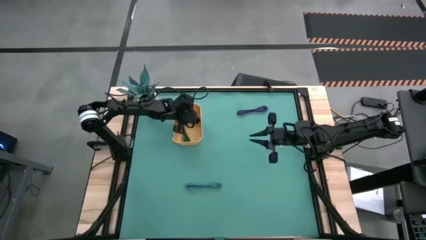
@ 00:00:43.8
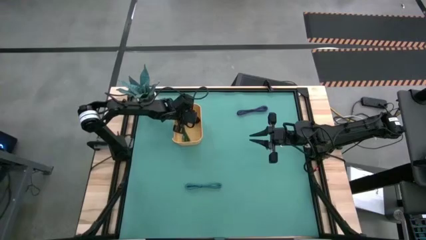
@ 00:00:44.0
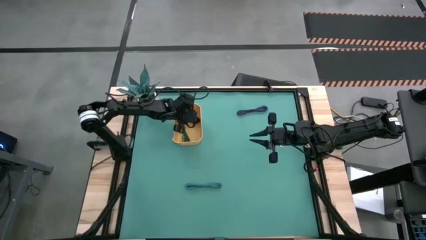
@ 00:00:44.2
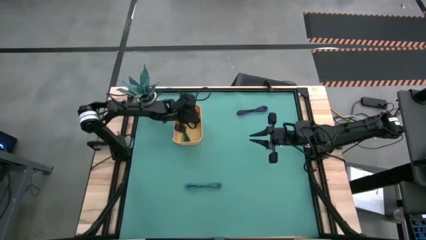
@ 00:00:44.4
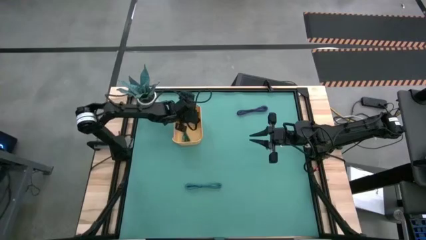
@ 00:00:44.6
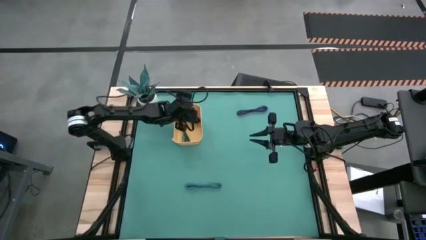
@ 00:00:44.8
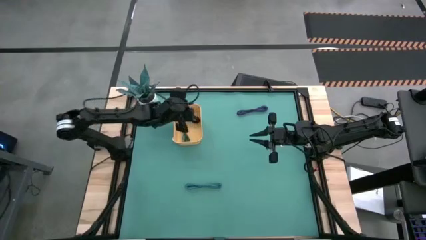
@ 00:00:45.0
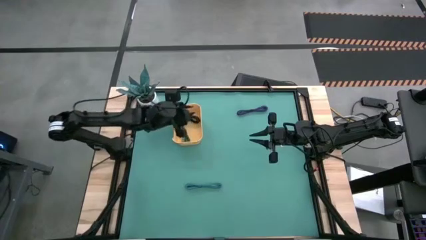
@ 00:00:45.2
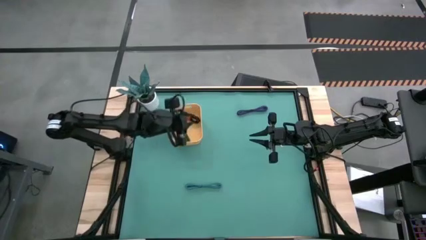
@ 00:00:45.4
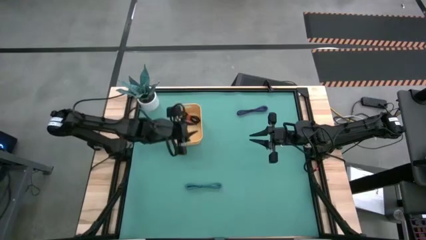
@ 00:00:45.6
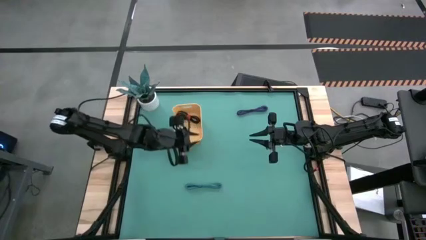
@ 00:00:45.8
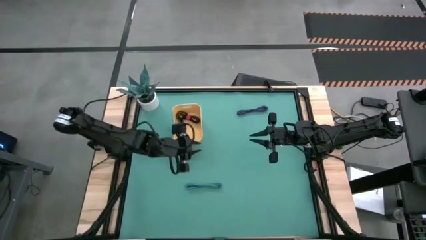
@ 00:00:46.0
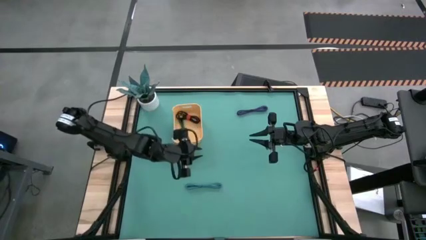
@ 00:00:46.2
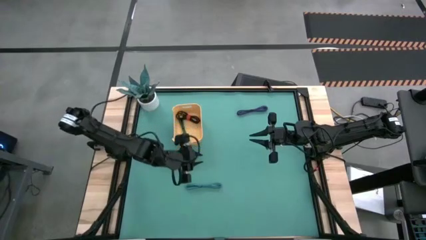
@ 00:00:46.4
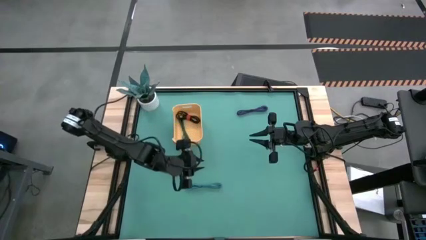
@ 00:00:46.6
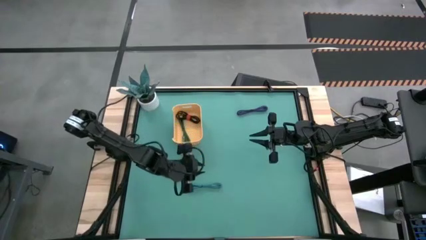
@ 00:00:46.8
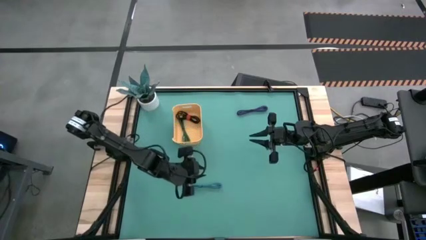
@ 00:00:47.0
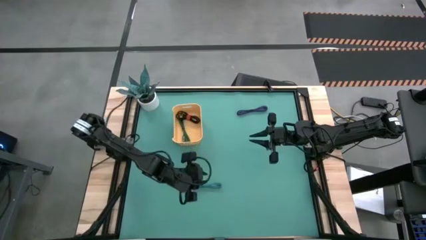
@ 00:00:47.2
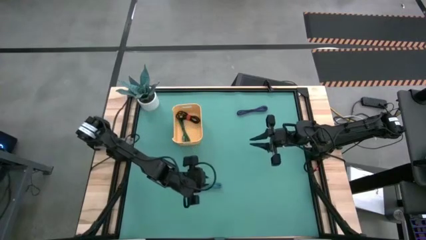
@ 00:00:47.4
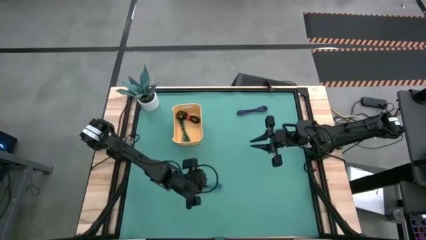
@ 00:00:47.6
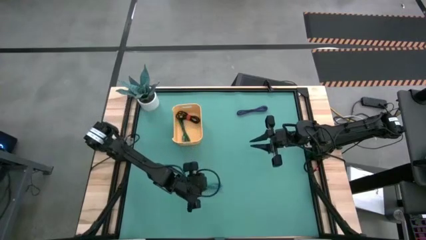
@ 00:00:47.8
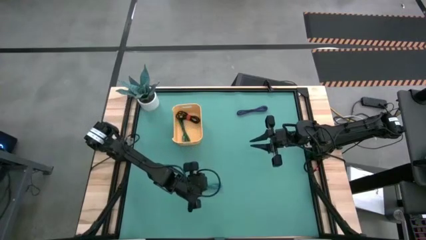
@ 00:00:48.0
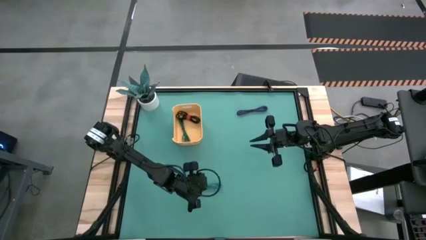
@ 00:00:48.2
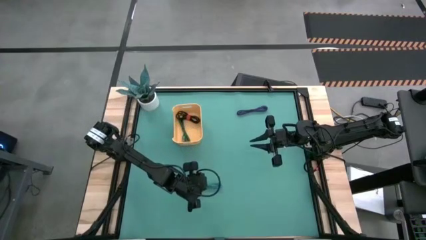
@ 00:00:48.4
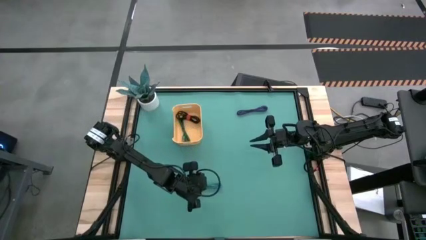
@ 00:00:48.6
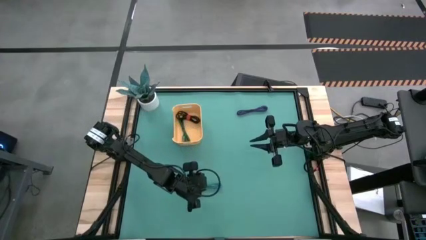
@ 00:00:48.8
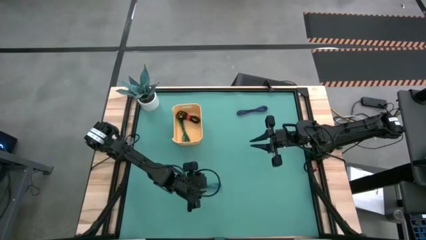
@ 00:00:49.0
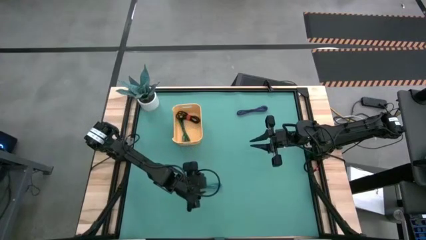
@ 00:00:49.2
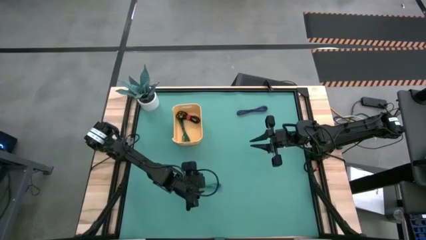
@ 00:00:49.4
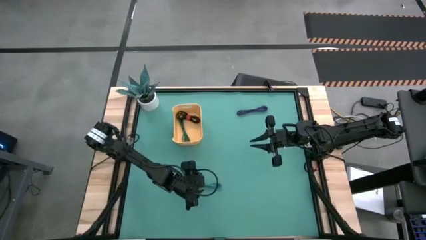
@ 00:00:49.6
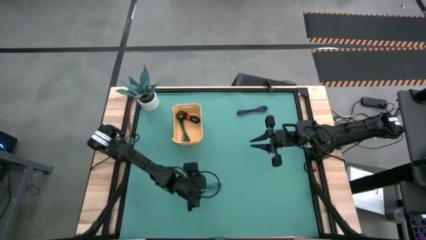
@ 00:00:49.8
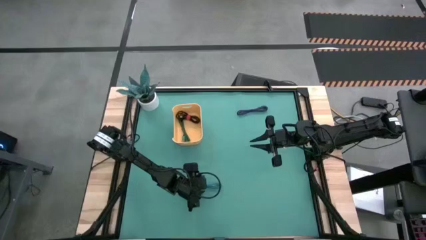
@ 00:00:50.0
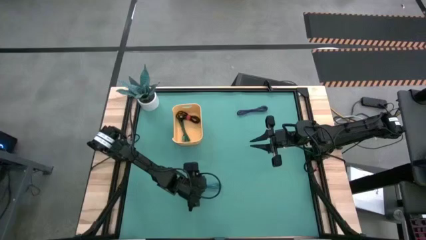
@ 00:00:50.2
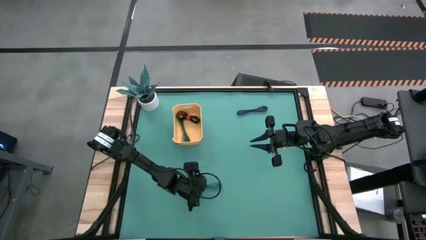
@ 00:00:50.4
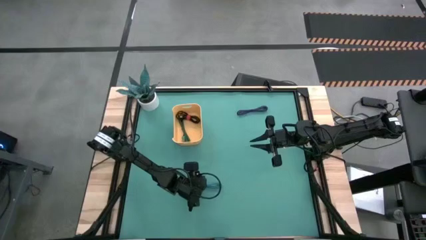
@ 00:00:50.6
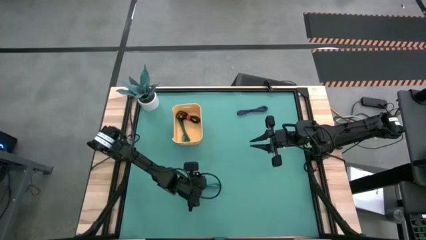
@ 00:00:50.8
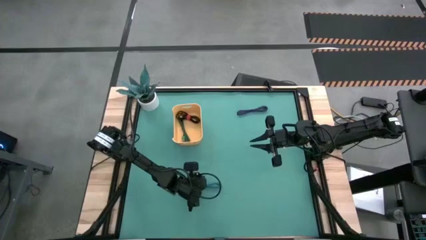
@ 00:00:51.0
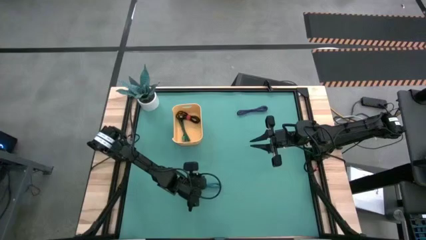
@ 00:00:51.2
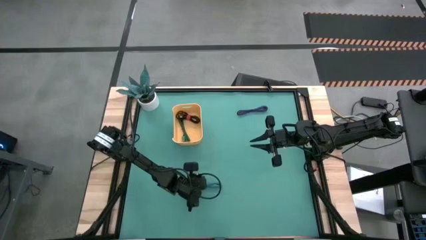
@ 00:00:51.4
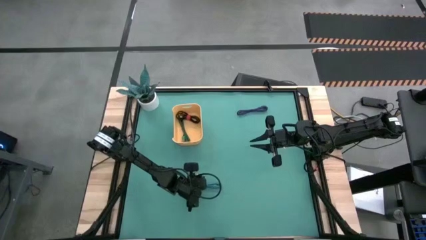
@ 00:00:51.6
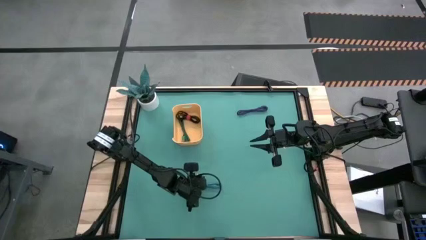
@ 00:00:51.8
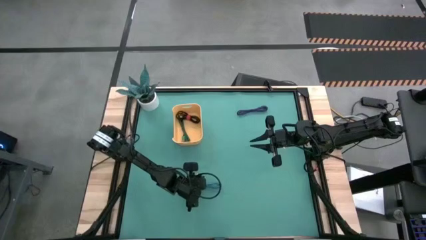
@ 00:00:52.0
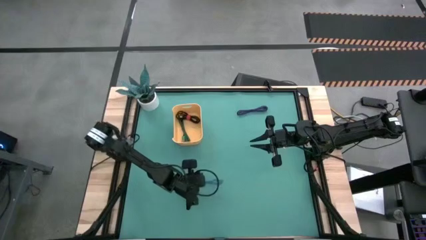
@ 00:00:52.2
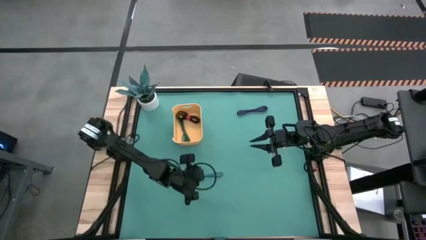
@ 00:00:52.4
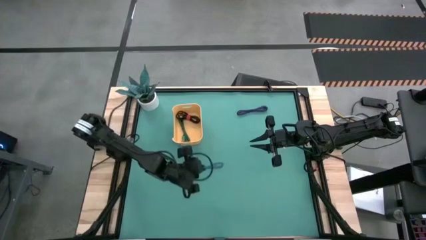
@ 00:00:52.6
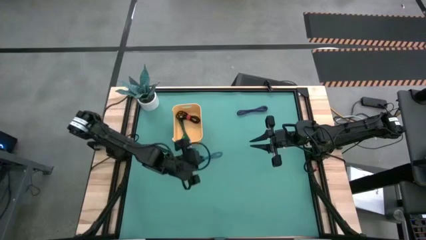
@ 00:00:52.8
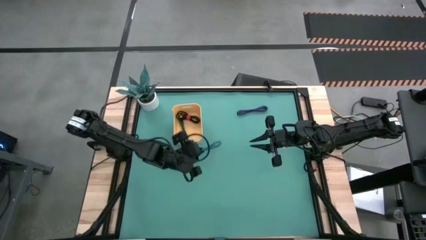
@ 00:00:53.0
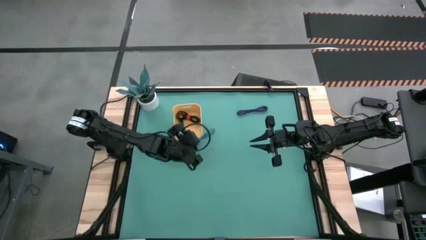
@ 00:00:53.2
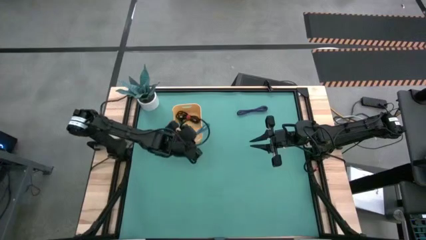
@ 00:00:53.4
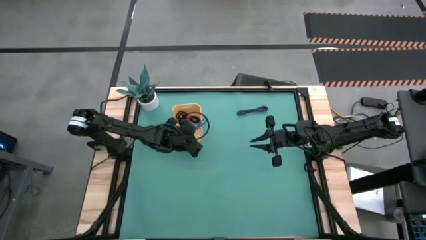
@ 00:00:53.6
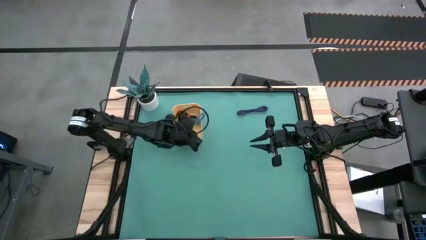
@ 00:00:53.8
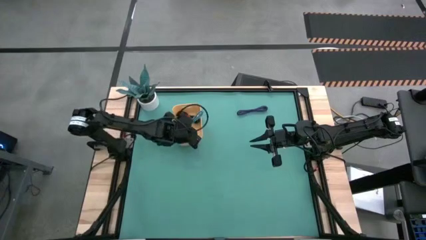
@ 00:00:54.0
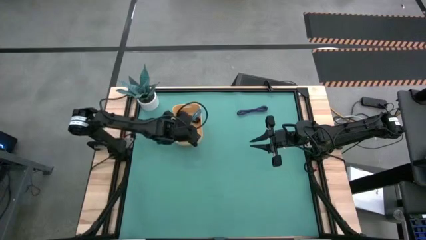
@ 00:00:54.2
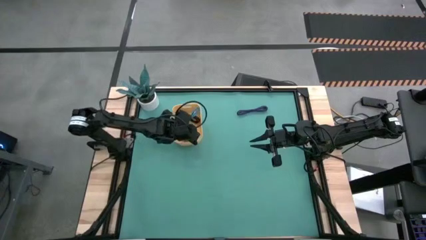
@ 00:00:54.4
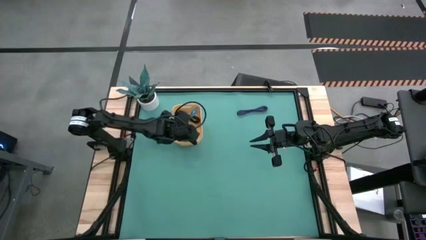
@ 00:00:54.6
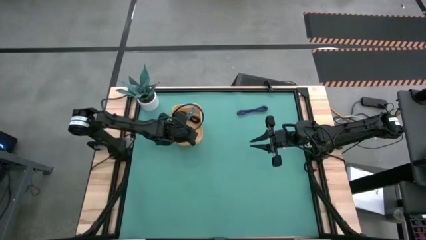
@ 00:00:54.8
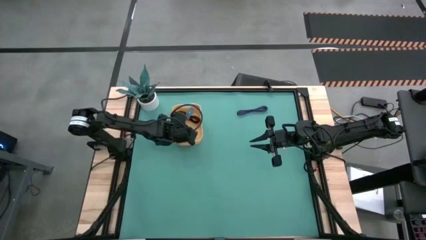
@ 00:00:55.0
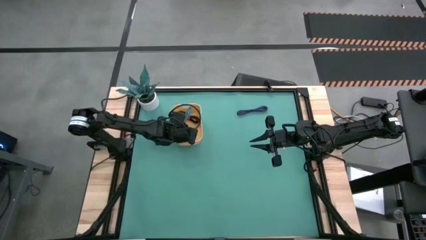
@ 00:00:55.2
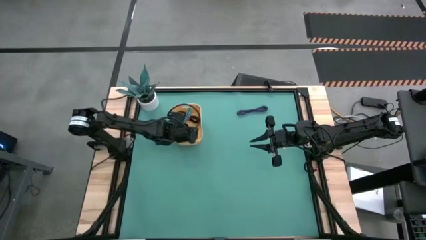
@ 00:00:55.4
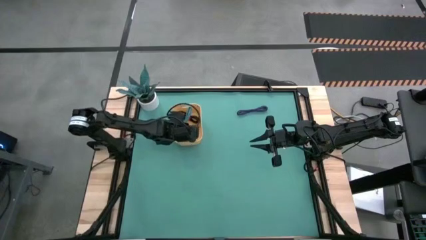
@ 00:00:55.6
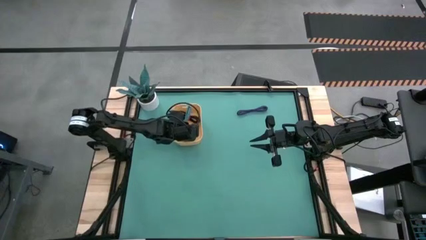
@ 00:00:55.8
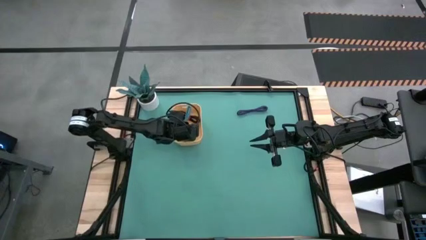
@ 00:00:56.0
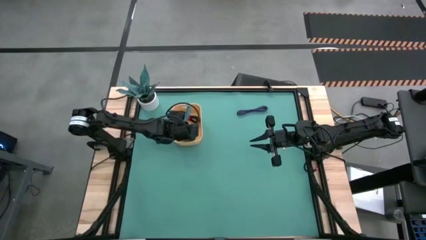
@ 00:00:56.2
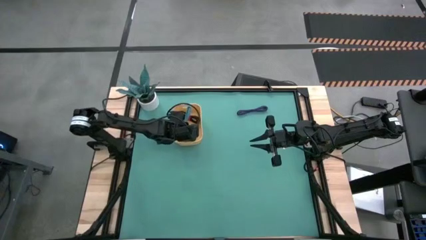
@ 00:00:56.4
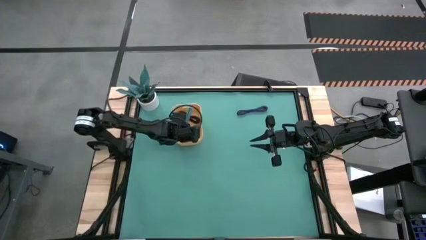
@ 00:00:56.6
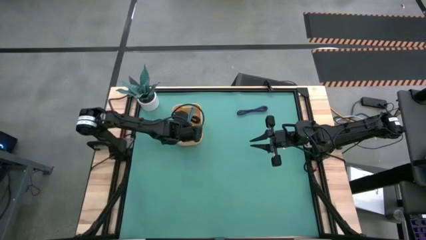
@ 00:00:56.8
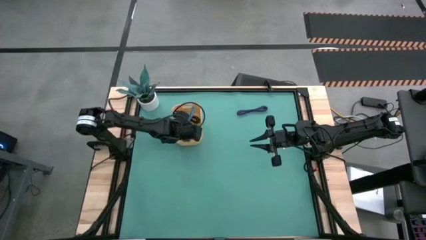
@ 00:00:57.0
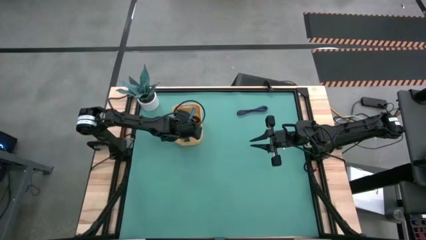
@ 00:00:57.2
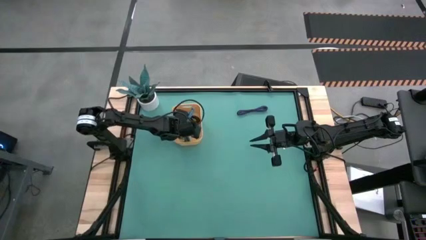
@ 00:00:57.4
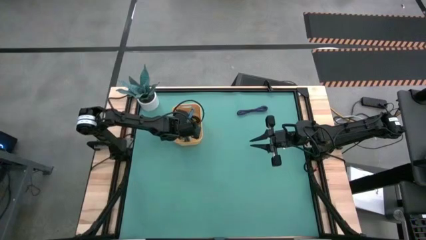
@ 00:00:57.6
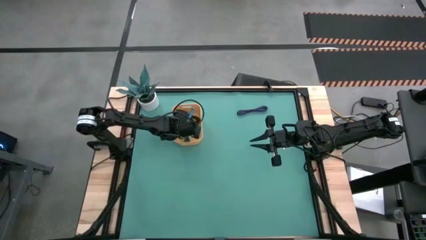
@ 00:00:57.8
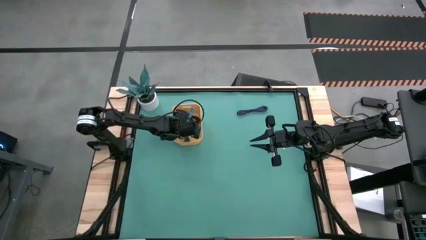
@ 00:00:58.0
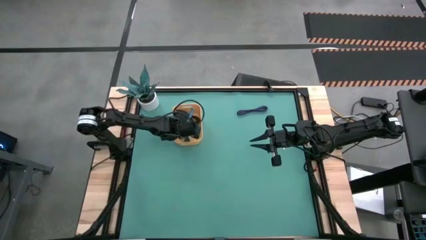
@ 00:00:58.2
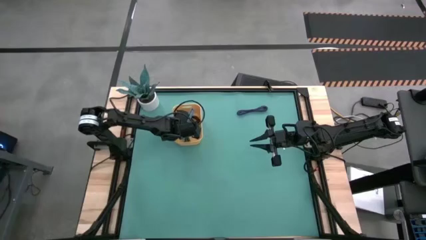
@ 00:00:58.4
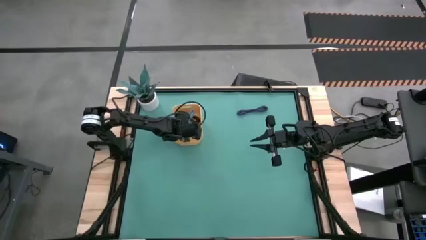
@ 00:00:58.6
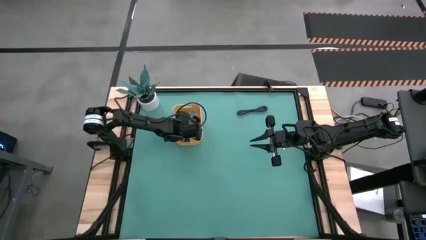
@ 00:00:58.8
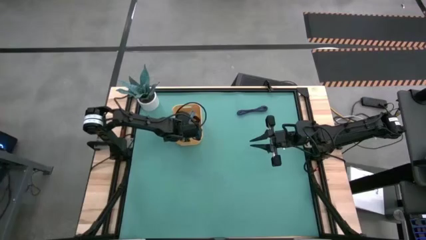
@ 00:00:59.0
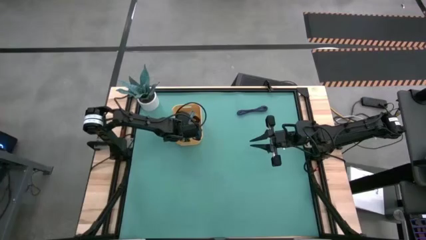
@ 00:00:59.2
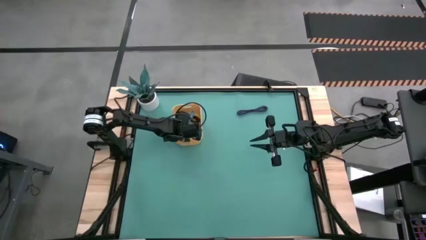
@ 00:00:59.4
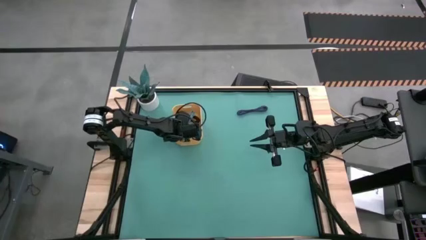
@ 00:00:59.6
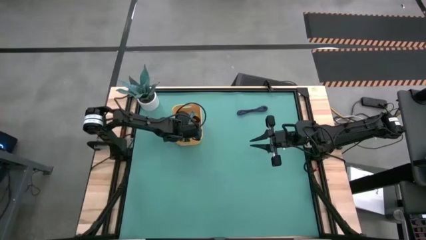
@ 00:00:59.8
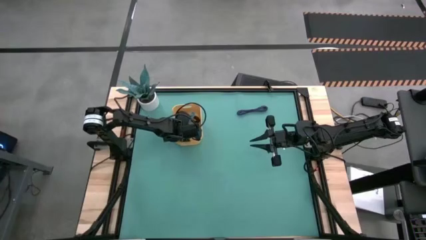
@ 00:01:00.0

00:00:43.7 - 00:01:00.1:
Task: Pick and place USB-C Cables
Put the blue USB cable into the yellow bin
